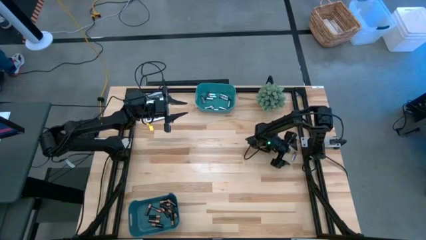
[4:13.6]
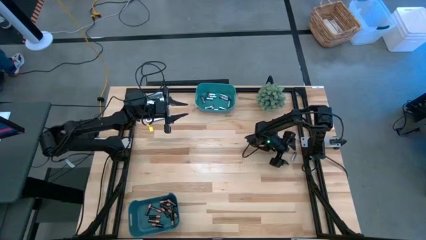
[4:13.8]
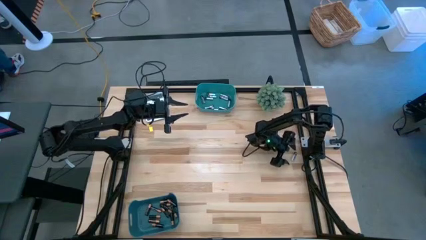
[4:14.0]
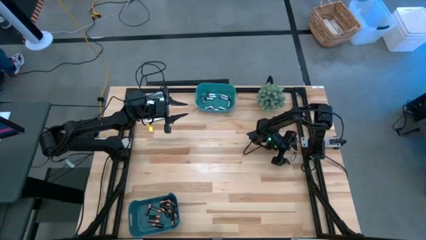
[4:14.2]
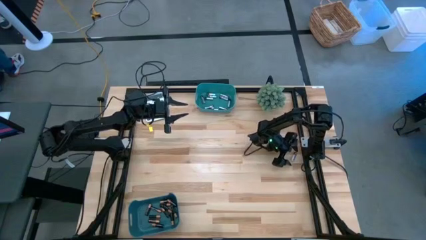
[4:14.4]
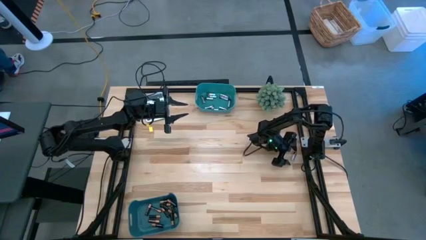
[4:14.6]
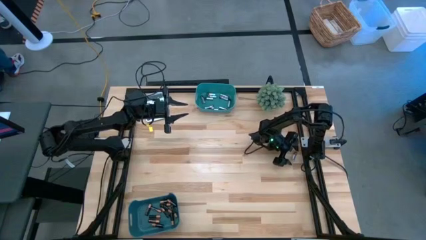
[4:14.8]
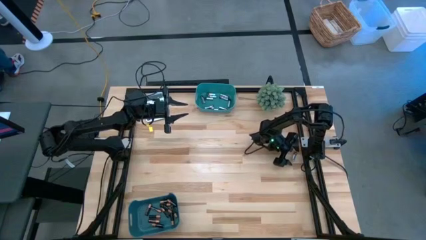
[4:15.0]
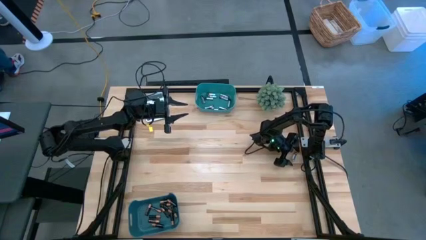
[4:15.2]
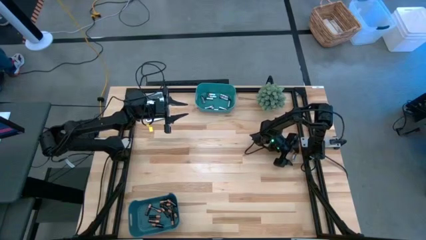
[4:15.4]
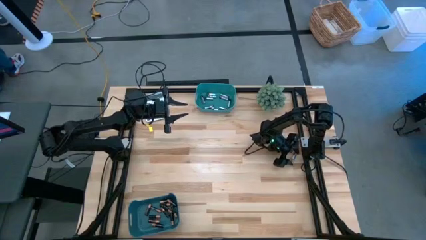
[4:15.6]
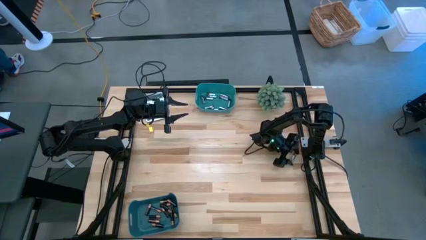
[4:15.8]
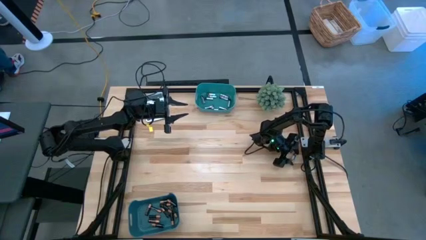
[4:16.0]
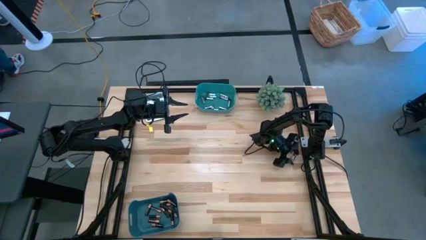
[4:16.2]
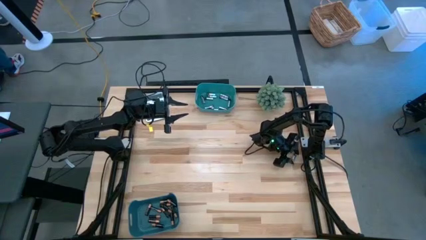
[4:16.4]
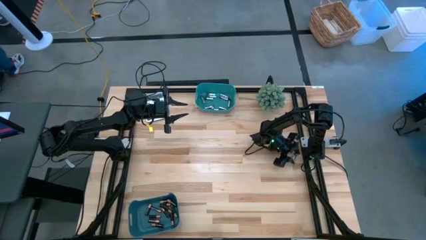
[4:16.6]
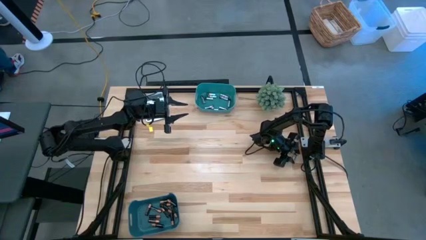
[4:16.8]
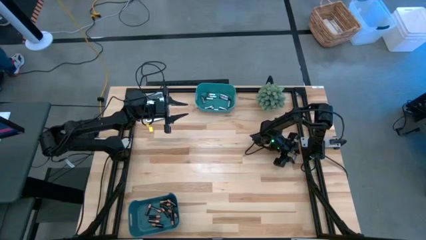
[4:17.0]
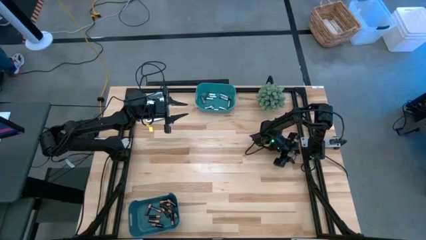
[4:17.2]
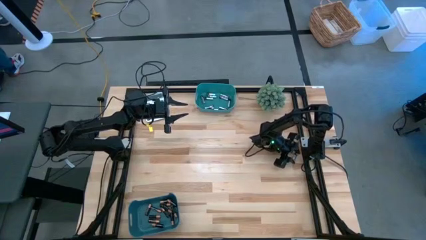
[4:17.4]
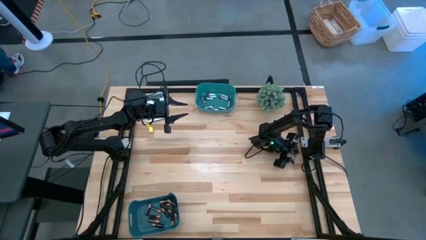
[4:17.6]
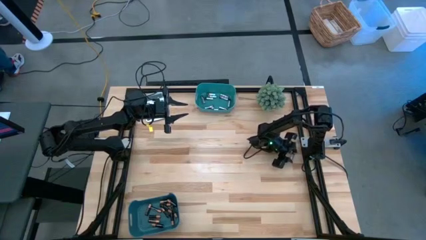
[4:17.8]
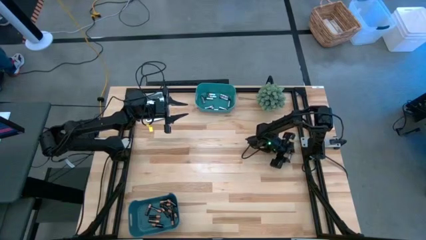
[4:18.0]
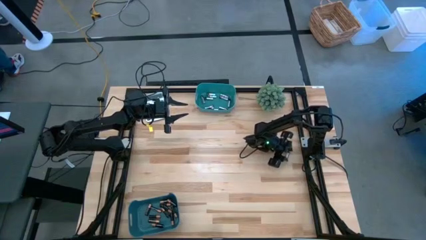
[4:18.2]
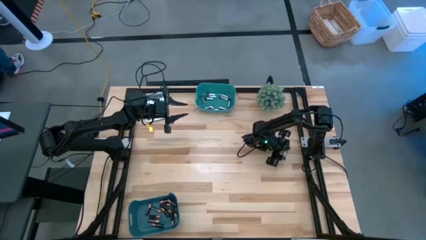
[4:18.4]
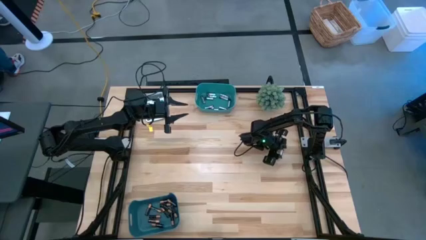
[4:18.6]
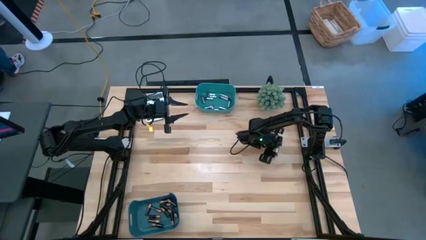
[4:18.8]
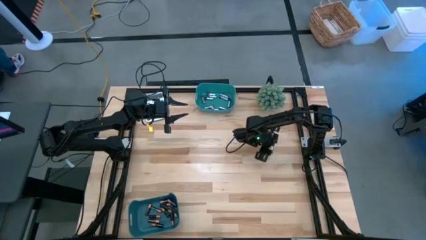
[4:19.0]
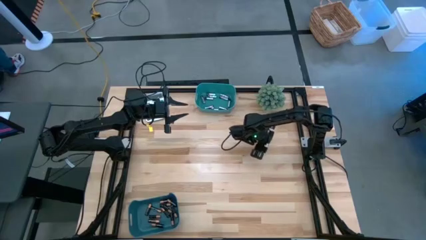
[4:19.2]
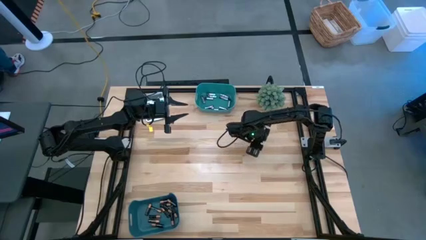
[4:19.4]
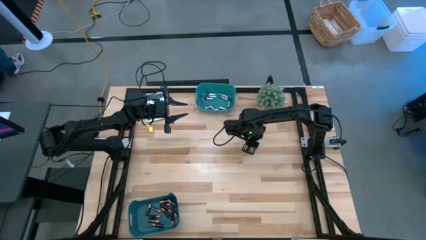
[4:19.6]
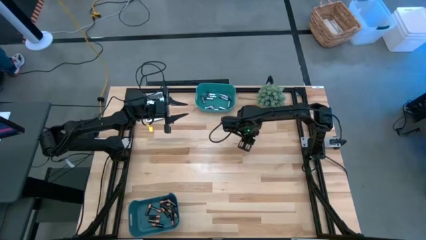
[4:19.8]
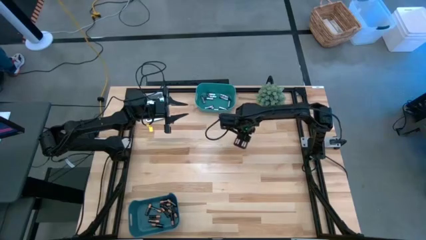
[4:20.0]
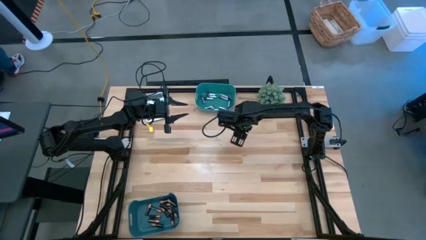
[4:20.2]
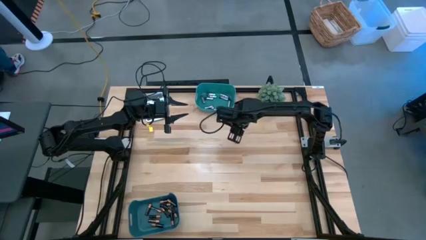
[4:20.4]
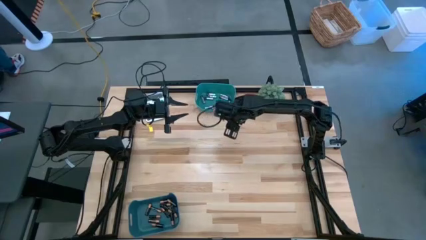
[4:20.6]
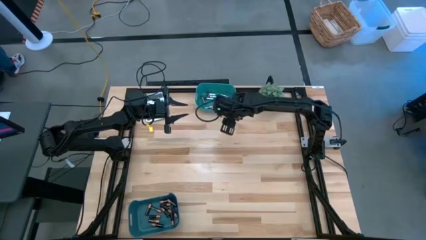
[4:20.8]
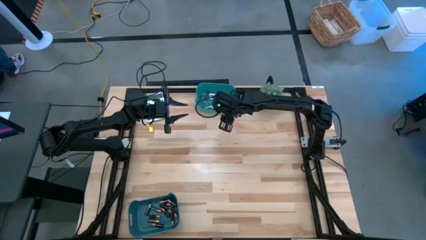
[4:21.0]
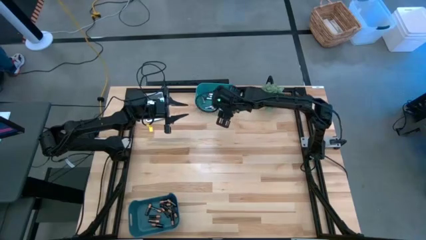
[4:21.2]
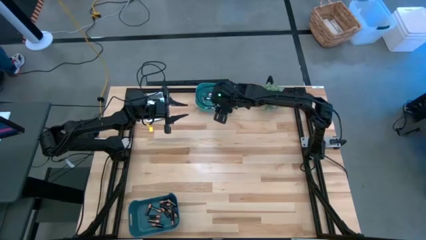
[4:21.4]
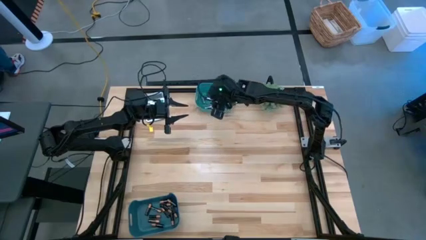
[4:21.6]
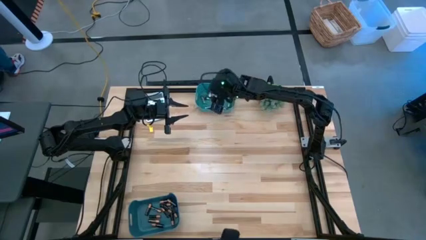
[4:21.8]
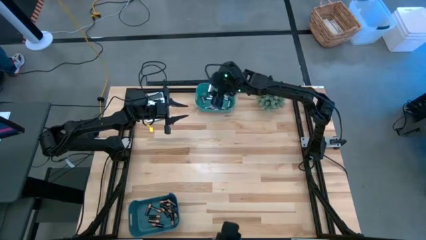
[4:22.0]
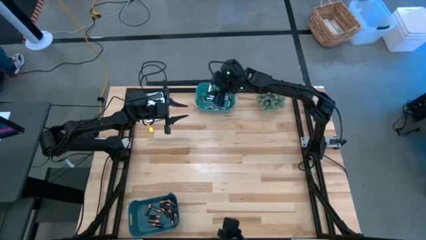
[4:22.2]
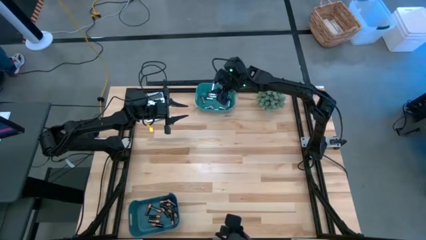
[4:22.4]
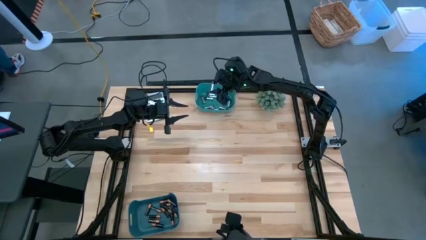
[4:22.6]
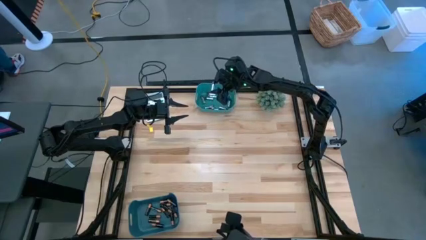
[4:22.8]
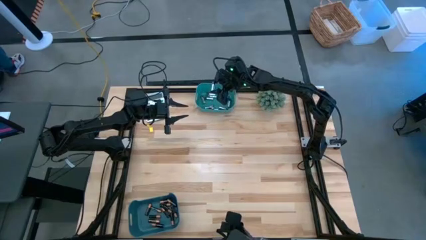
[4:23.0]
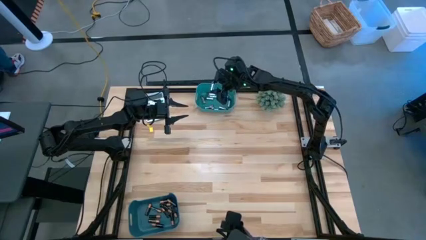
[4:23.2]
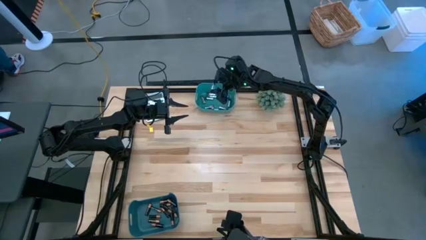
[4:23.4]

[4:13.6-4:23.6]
Task: Sort batteries
Put the battery into the top green bin

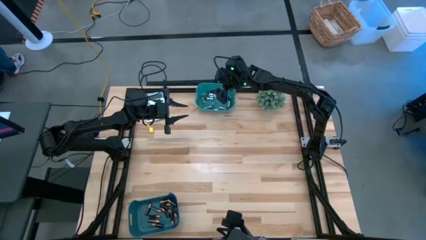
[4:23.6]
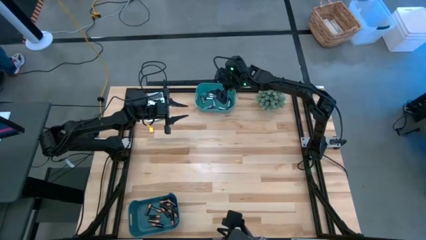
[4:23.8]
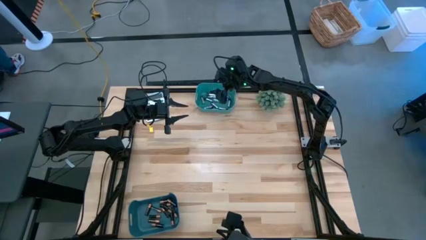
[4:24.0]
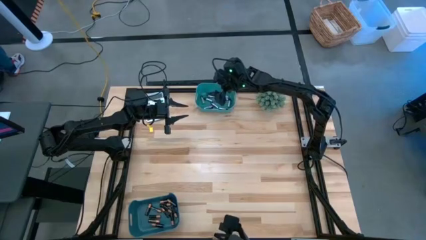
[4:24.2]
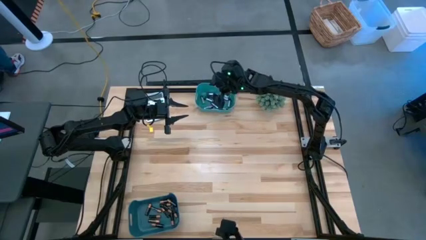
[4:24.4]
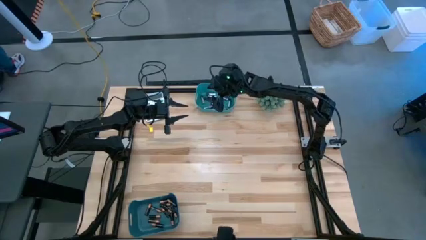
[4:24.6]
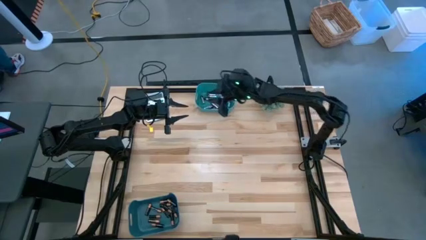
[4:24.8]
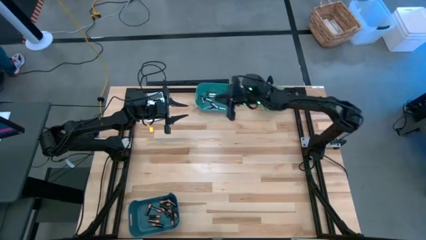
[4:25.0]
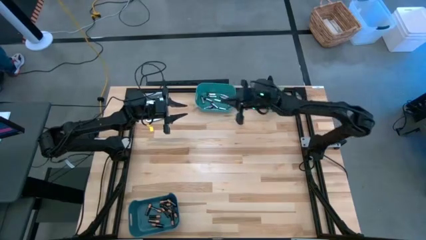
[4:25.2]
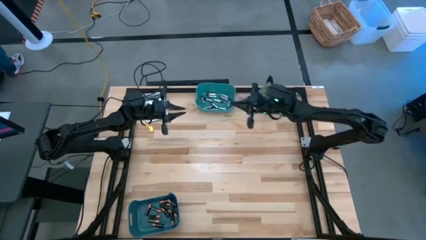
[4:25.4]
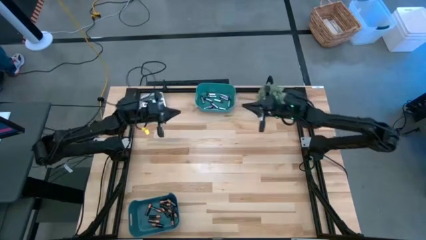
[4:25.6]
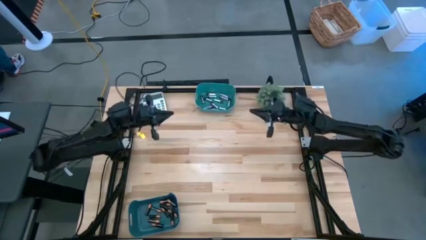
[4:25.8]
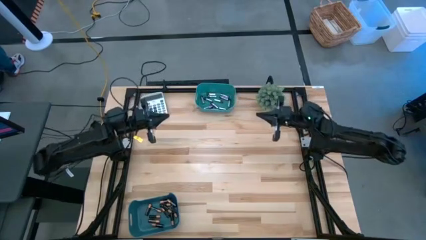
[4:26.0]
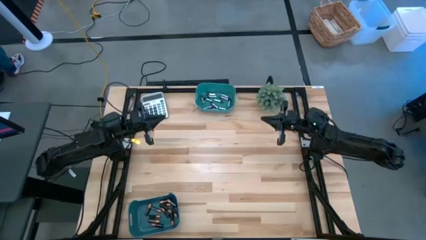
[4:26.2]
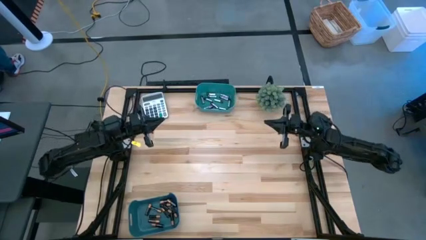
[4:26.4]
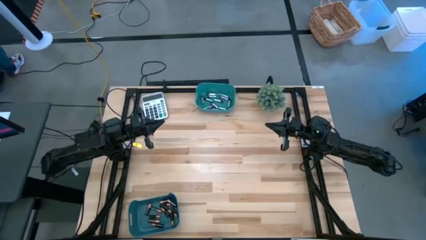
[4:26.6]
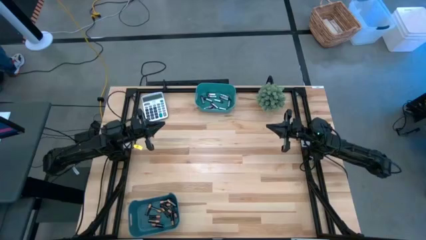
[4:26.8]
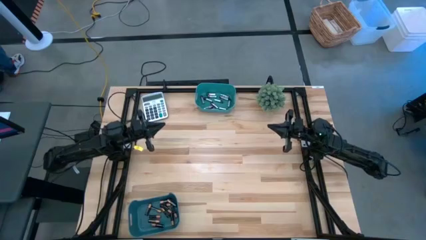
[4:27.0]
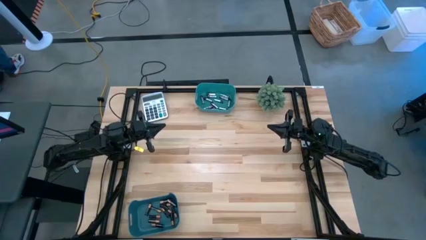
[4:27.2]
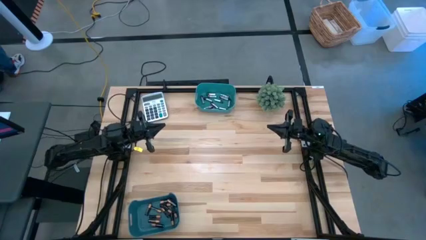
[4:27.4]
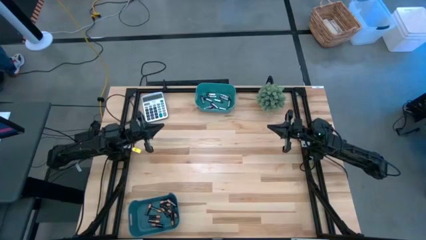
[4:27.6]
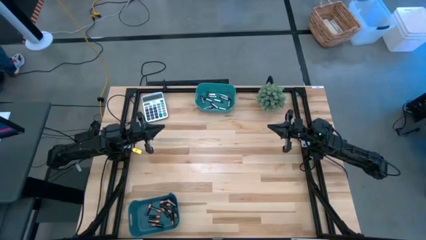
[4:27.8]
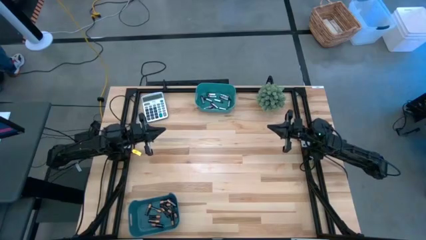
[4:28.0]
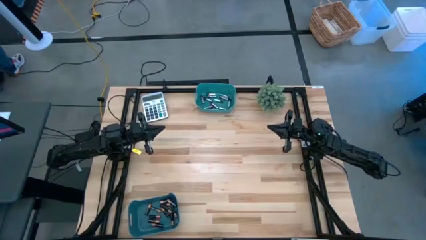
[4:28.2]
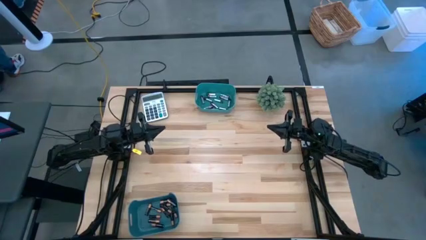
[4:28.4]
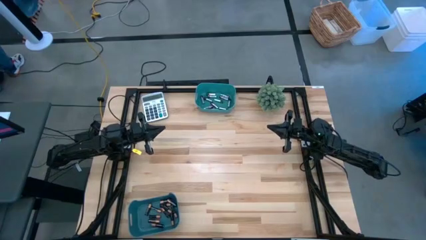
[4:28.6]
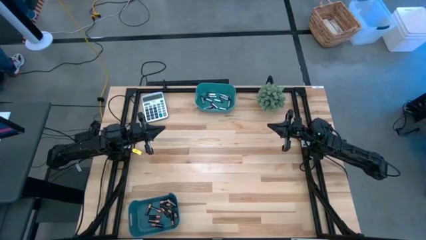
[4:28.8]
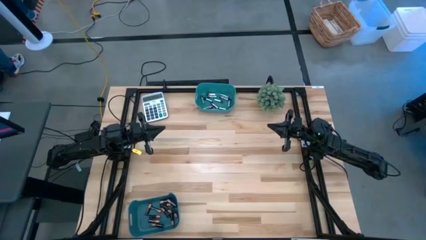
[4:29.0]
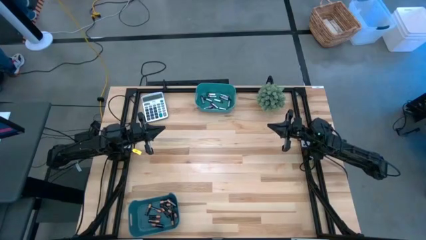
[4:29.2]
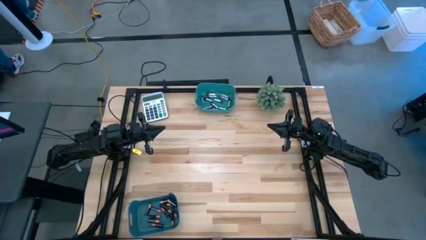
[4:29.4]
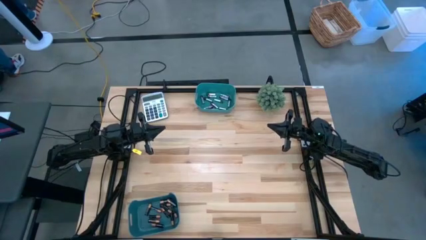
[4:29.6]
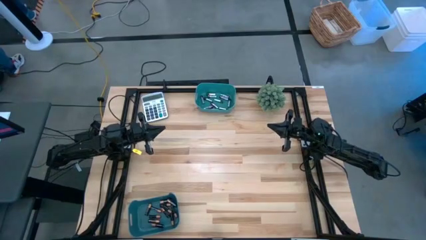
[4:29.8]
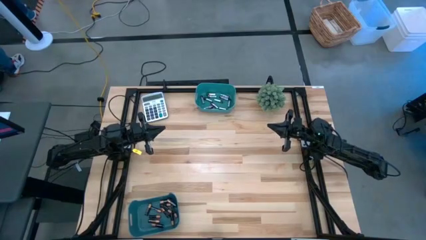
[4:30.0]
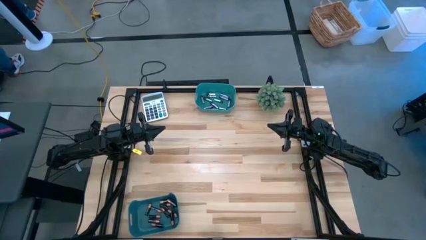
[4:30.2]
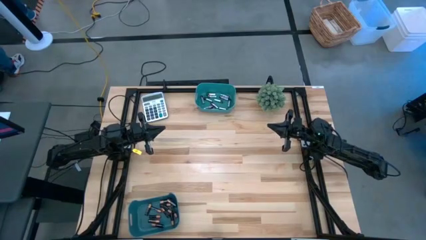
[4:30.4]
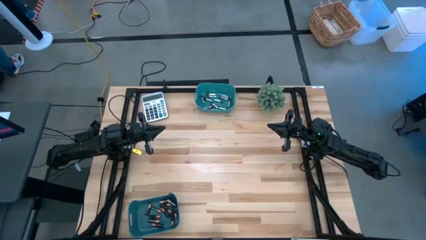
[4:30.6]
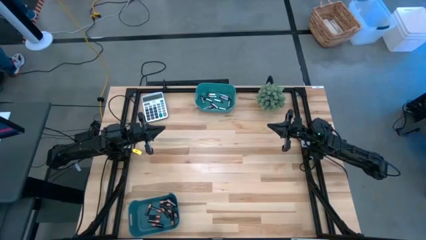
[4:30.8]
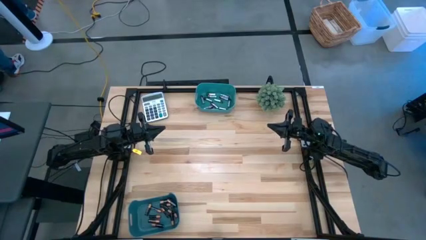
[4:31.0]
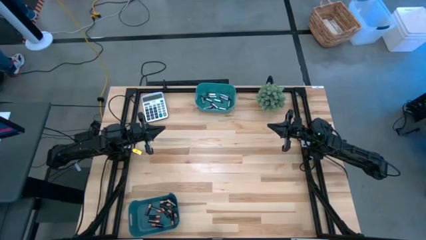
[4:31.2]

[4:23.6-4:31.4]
Return to Home Position
